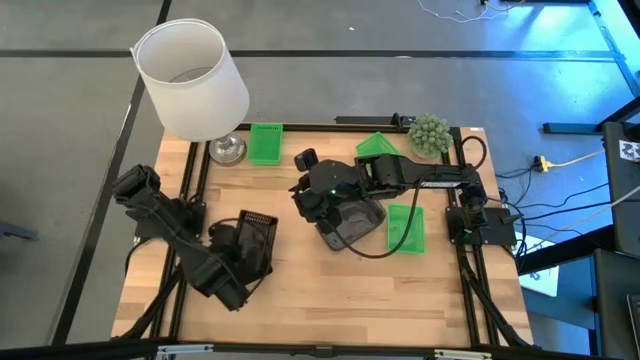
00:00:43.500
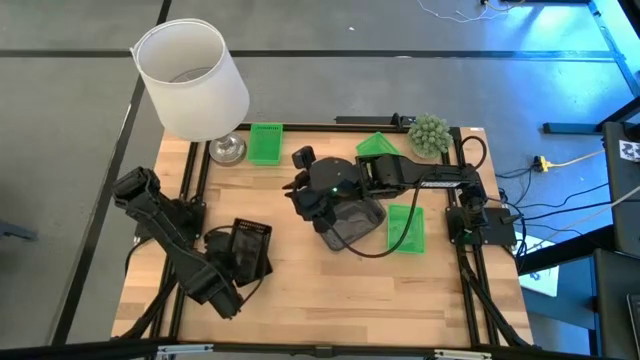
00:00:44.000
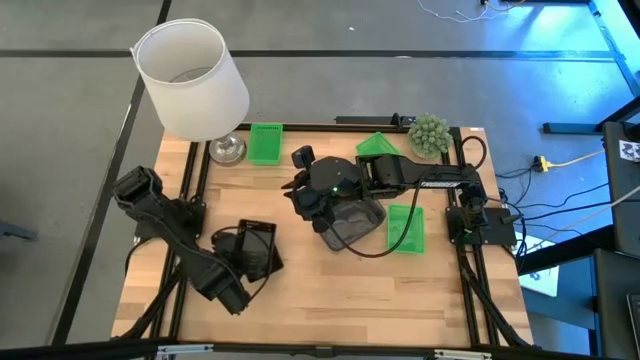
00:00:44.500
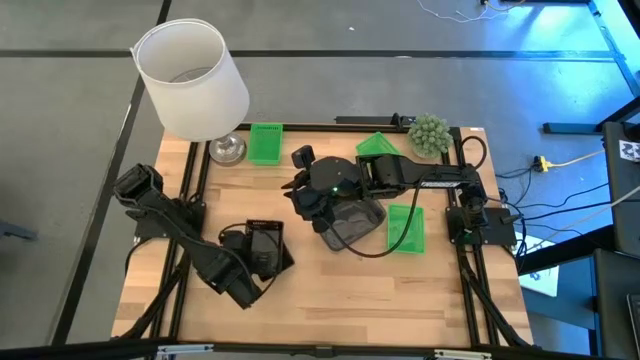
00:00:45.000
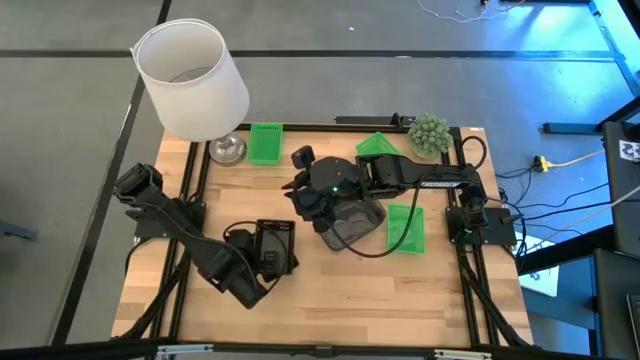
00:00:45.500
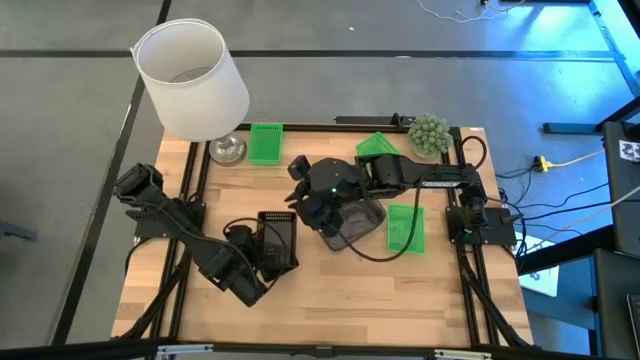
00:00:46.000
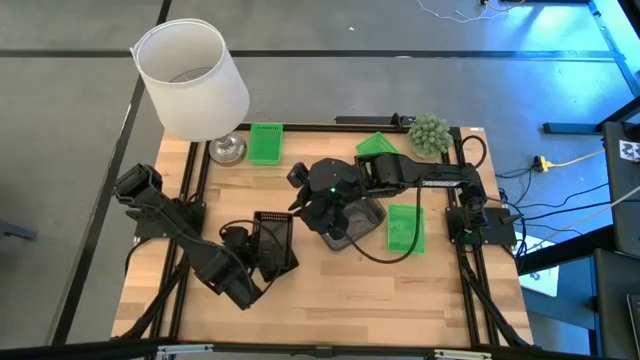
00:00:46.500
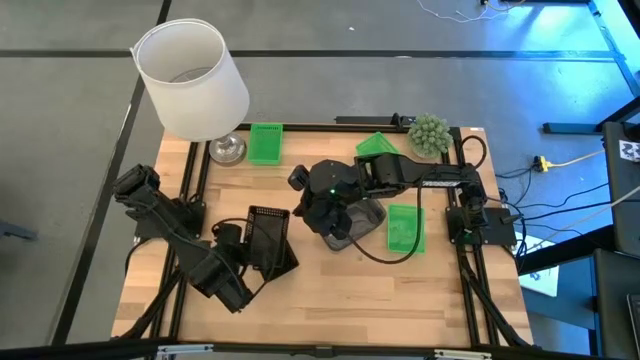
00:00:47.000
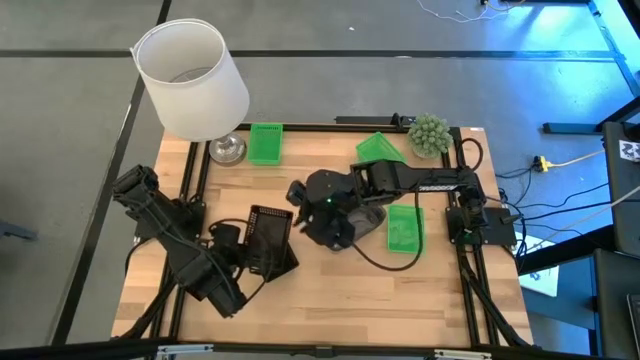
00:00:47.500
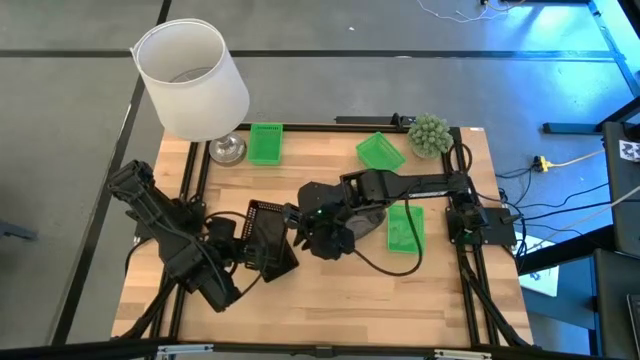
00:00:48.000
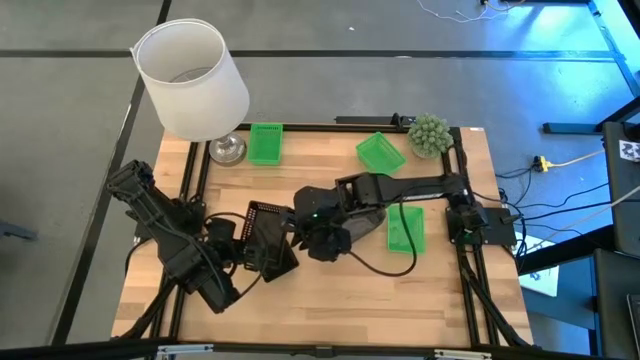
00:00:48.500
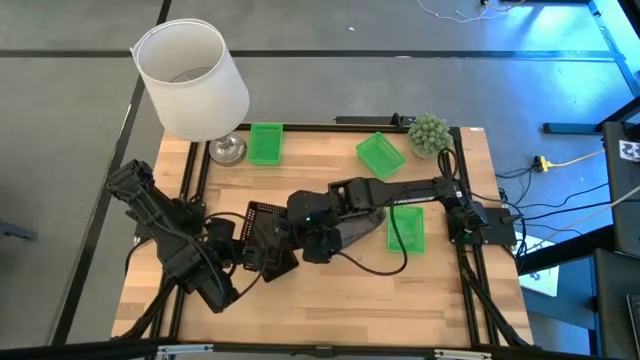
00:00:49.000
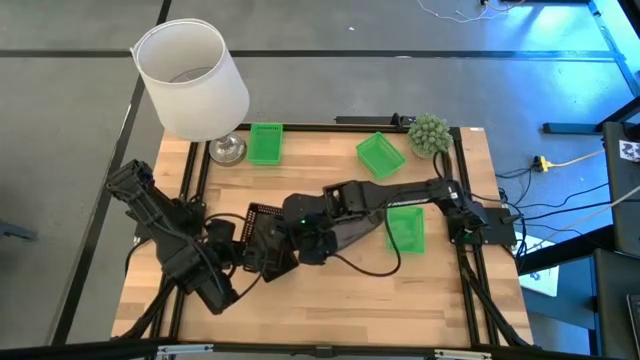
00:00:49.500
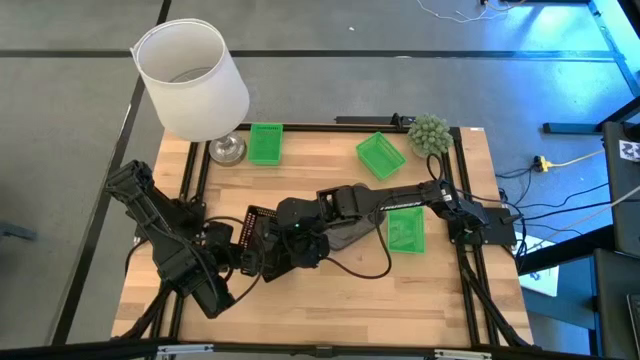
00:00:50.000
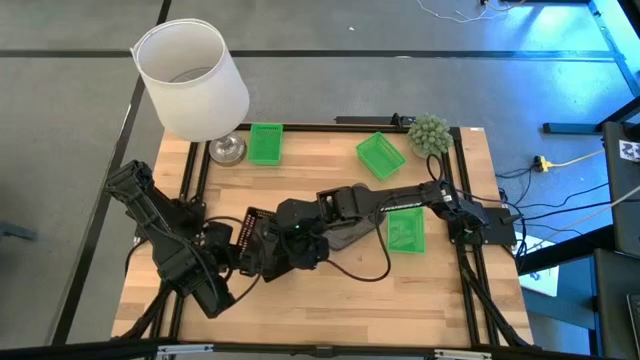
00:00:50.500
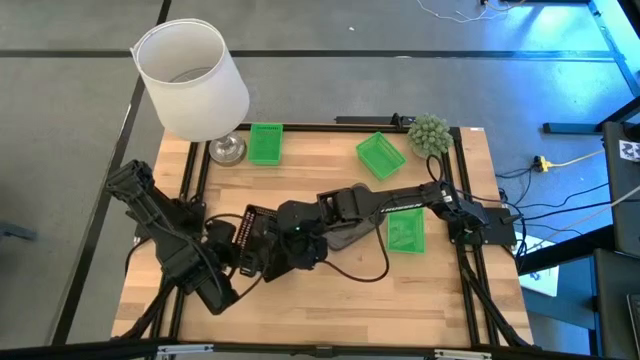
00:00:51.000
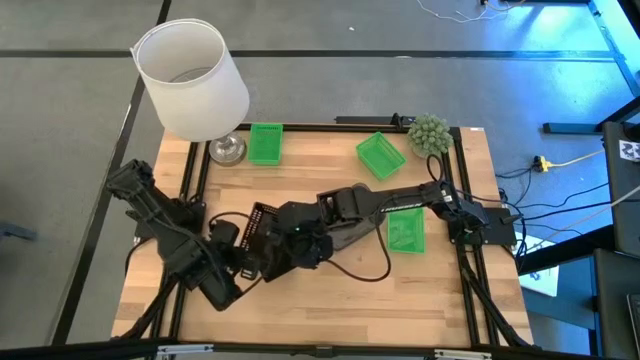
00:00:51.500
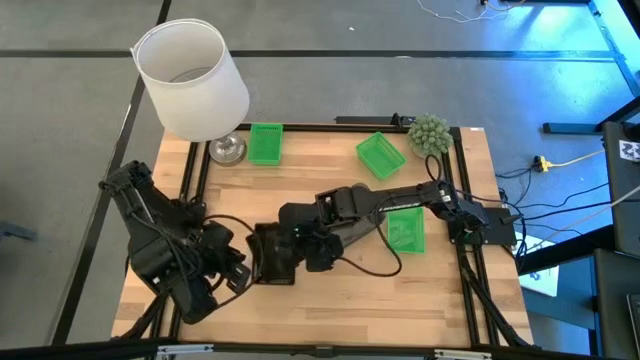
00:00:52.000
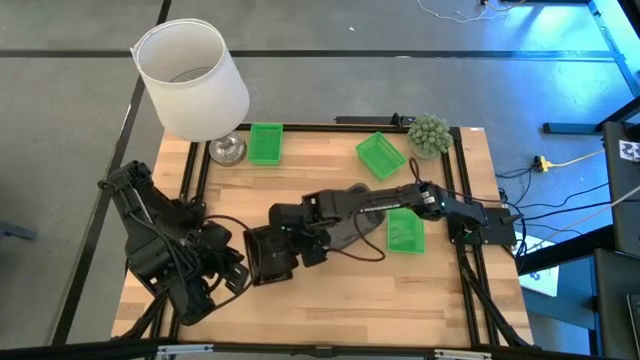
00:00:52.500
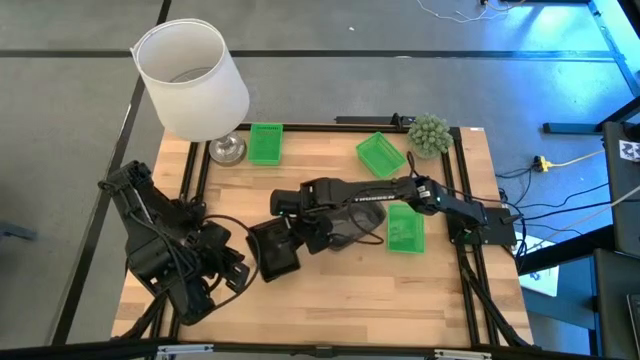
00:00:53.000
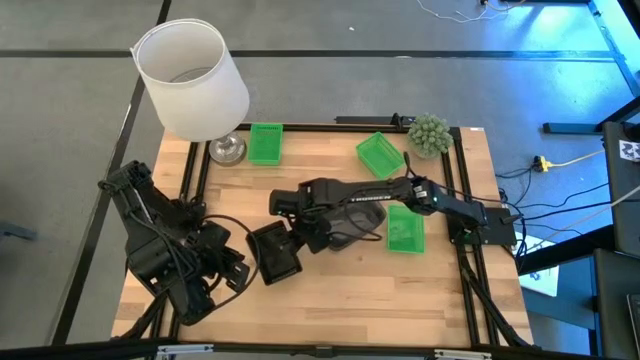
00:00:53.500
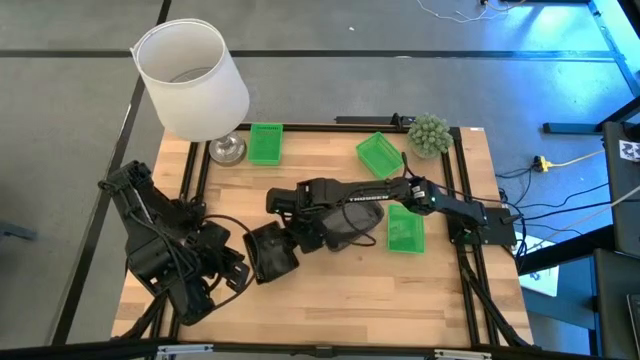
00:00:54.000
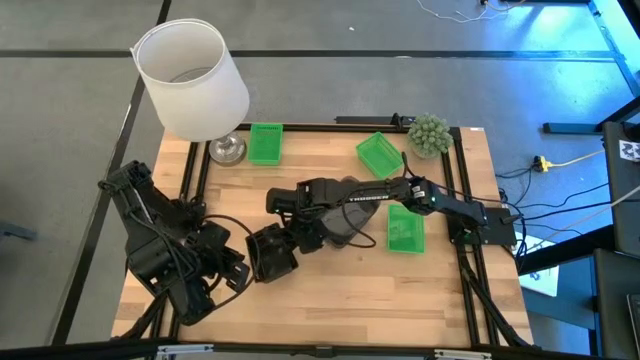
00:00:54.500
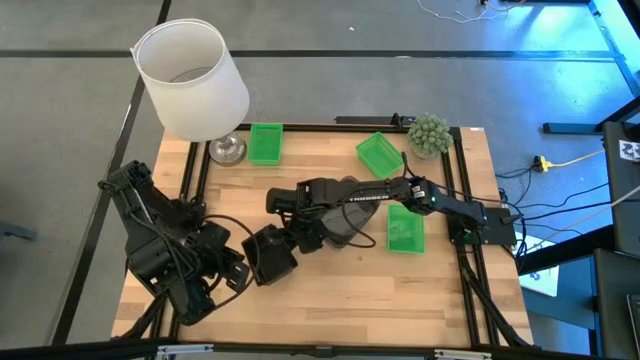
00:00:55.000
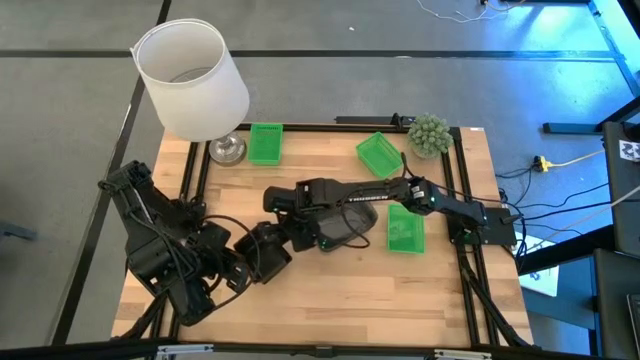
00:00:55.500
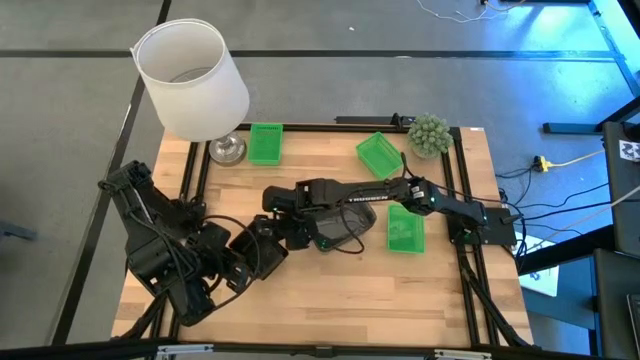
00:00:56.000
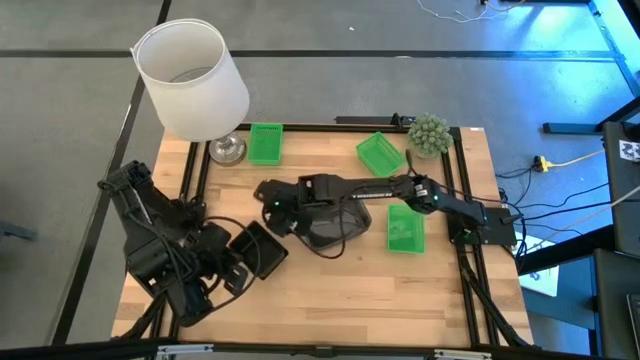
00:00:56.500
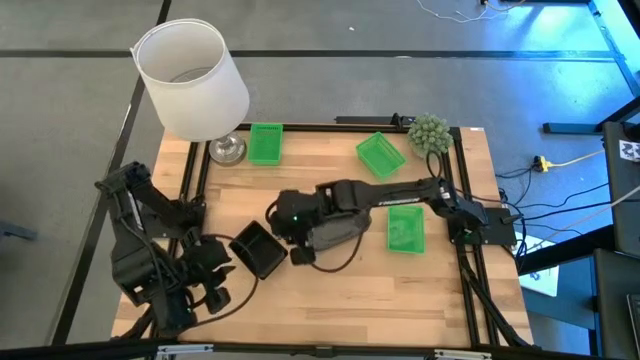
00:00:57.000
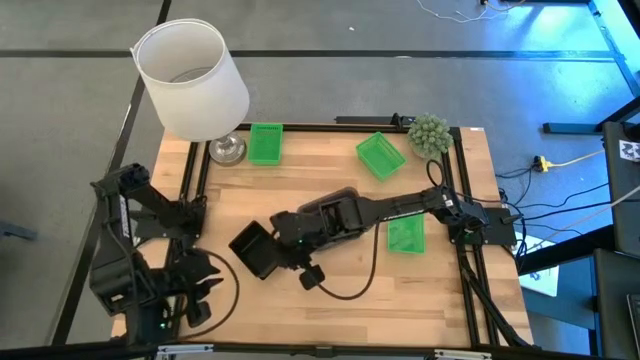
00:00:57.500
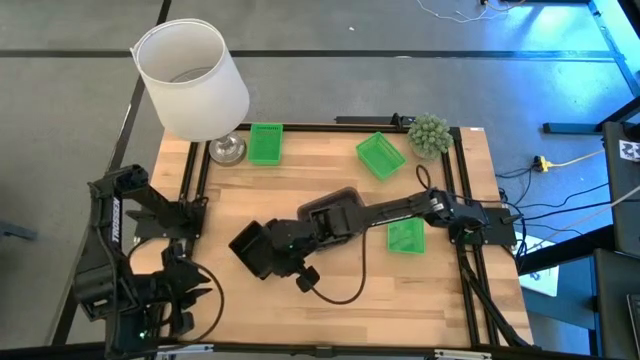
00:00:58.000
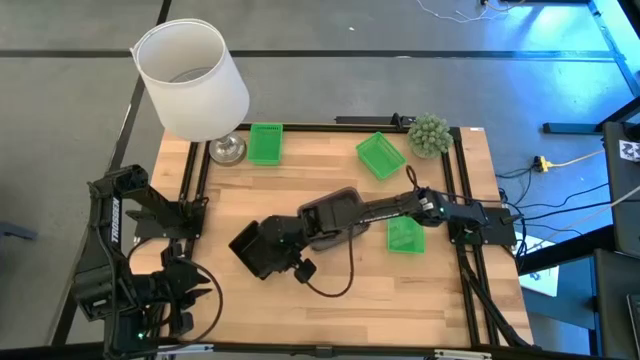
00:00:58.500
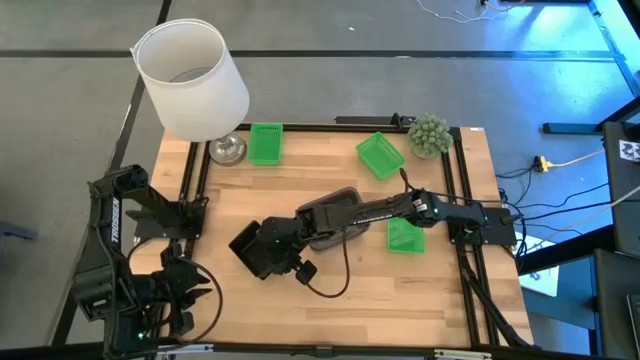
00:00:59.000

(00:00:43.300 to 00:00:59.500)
Stack the top black bin on top of the bottom black bin

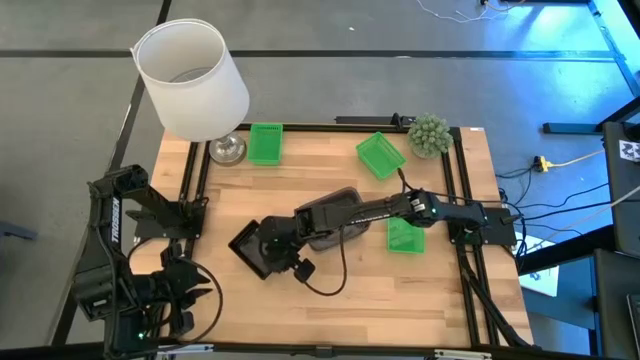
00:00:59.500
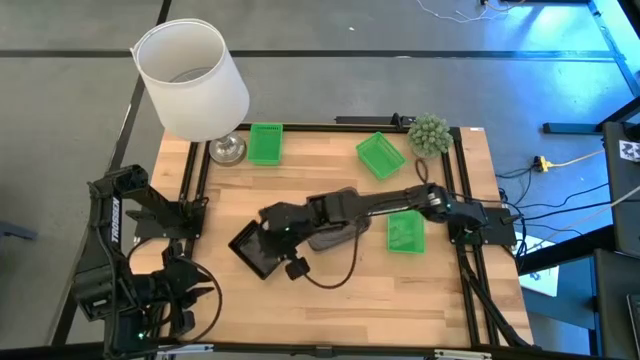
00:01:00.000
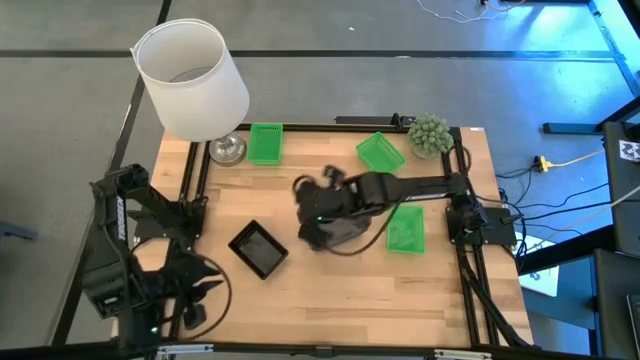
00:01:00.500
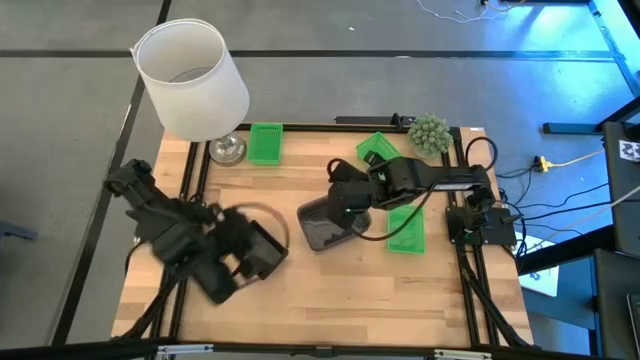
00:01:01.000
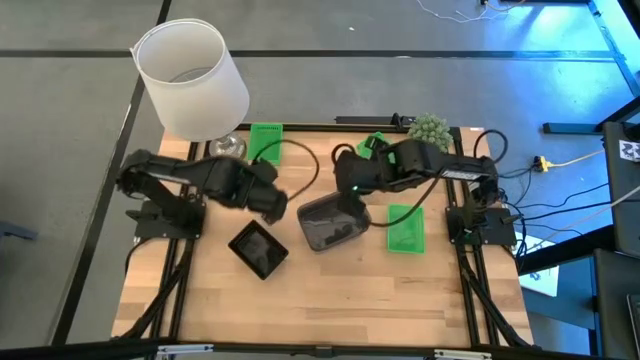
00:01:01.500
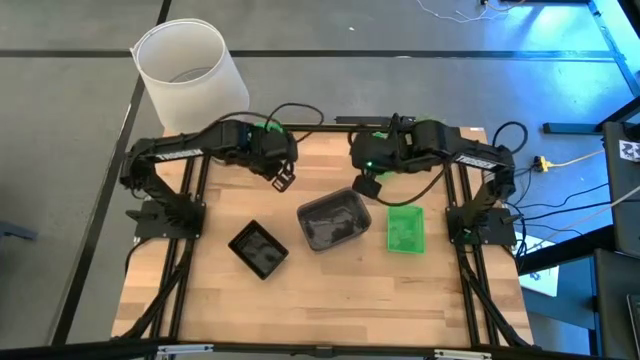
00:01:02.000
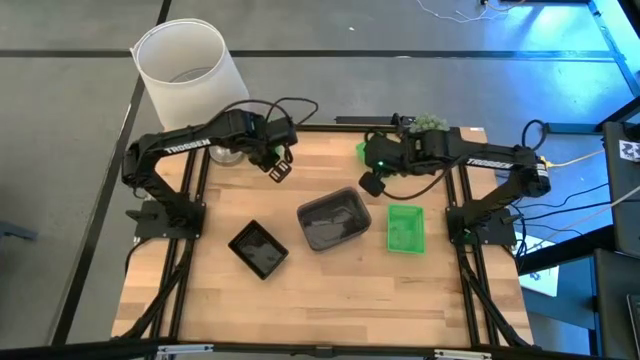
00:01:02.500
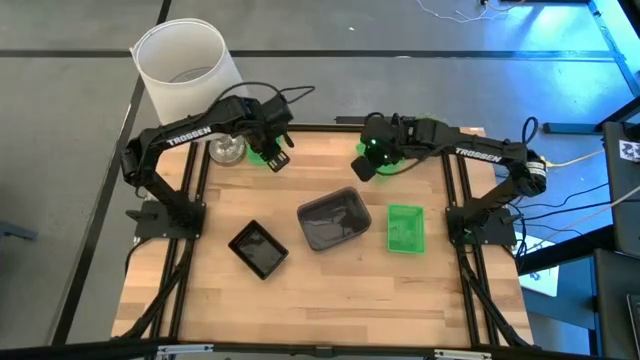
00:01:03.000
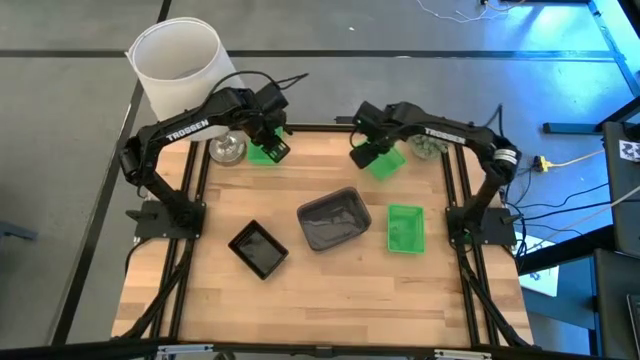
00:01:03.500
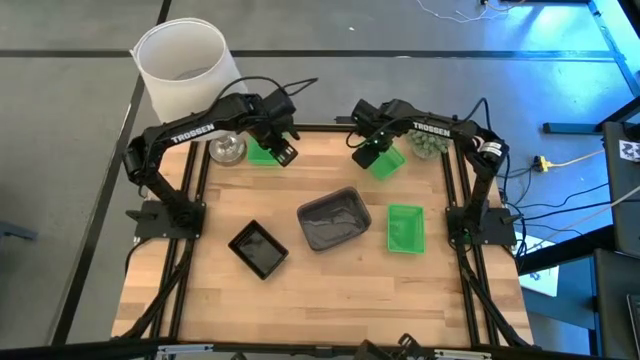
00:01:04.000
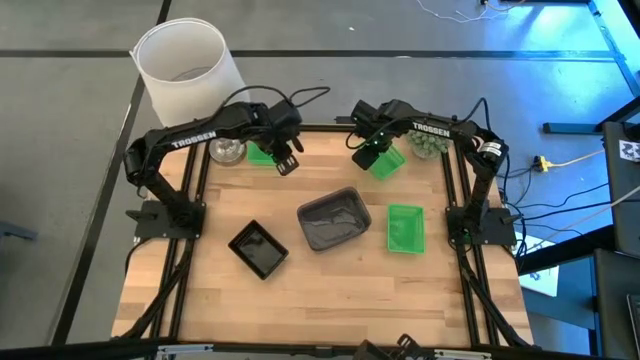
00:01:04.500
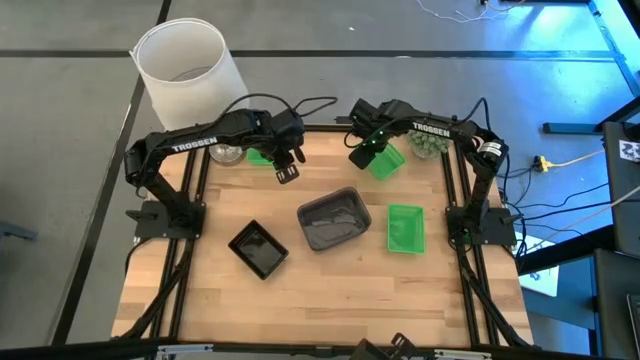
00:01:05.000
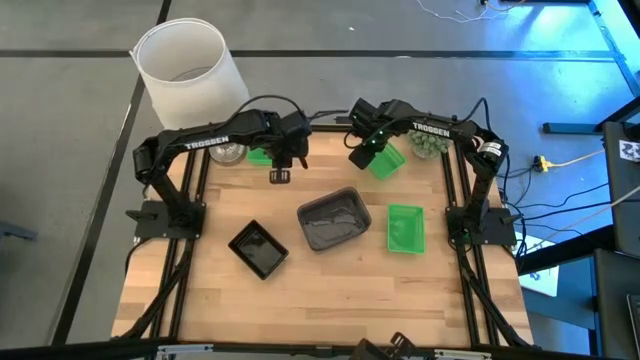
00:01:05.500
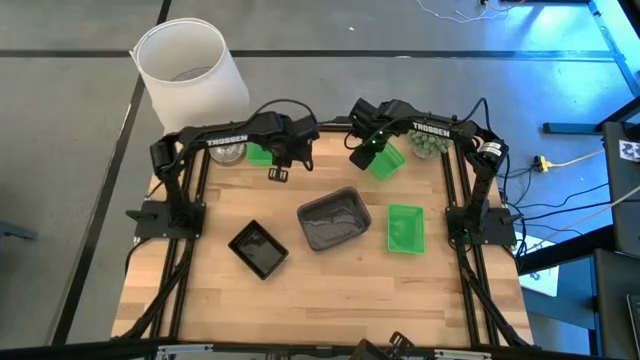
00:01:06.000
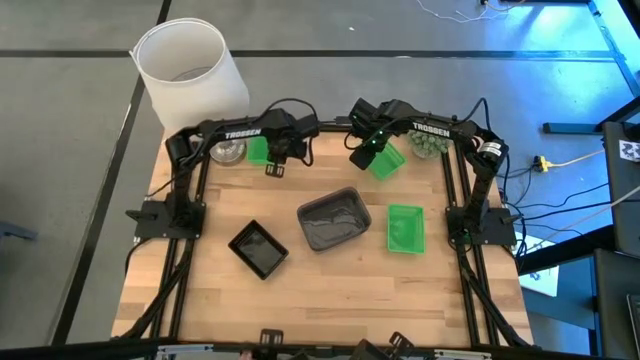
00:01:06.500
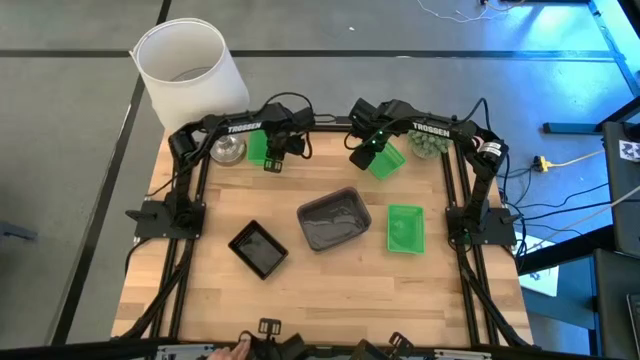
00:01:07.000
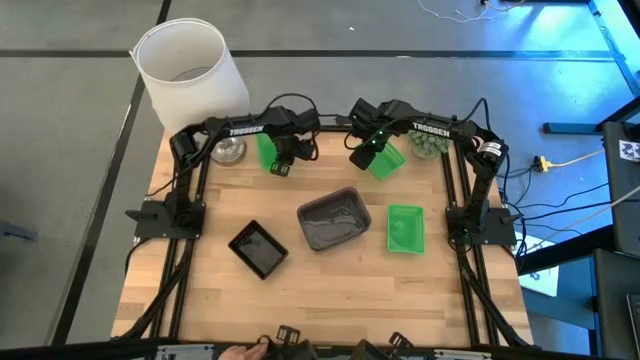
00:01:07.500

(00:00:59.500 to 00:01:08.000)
Move the left green bin to the top center of the table
